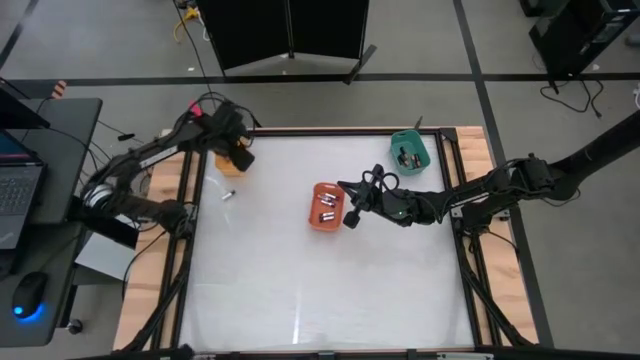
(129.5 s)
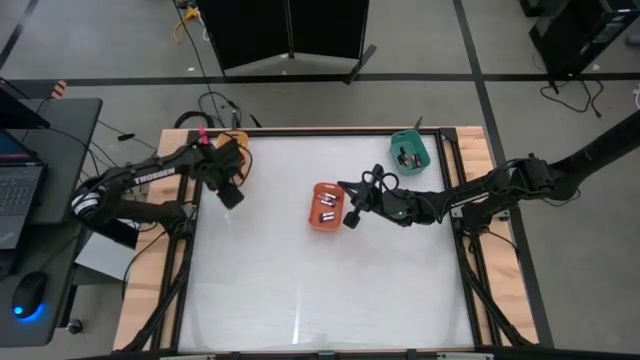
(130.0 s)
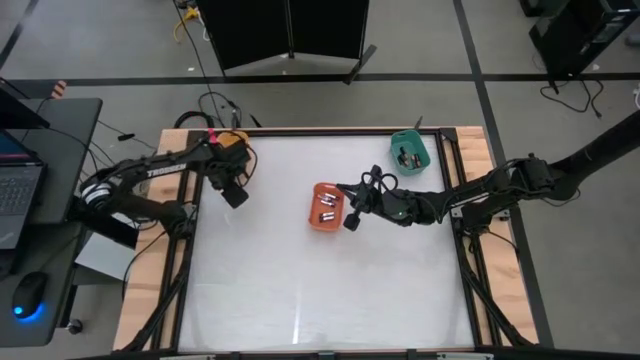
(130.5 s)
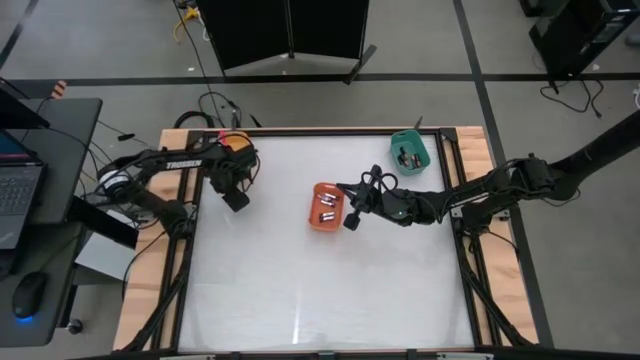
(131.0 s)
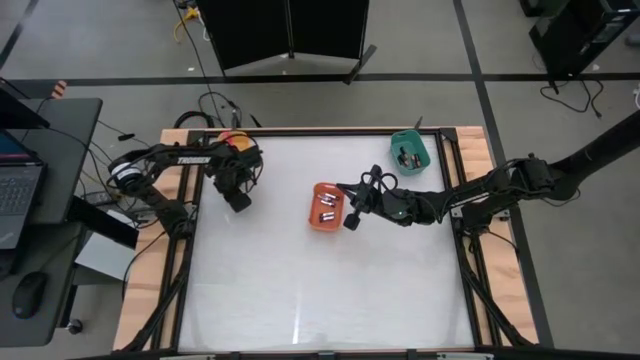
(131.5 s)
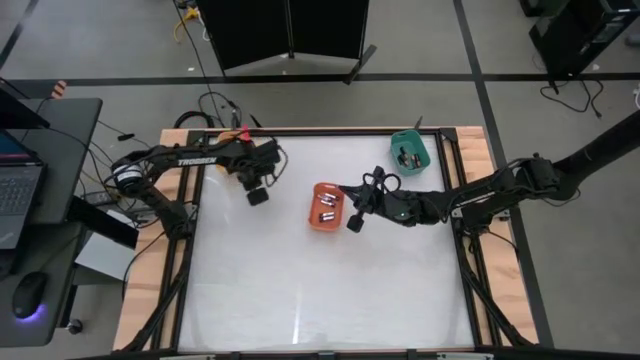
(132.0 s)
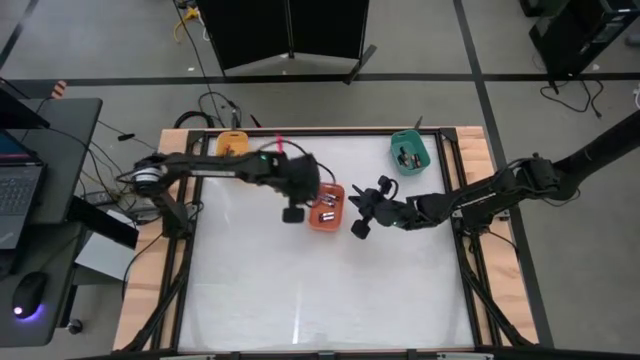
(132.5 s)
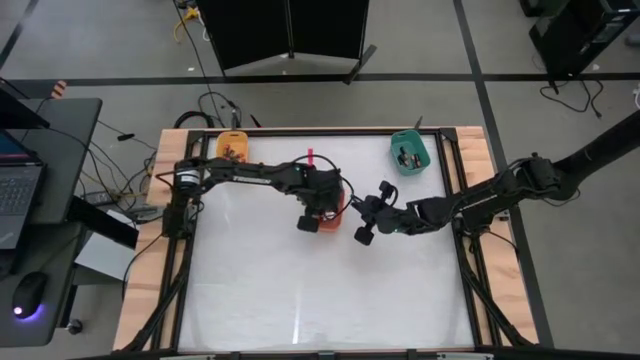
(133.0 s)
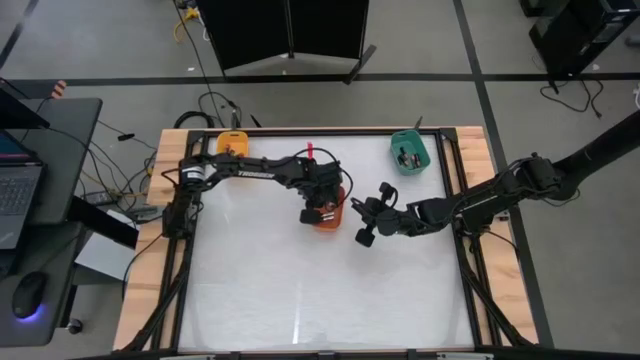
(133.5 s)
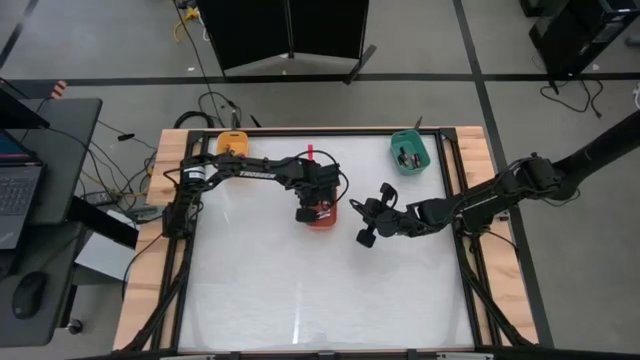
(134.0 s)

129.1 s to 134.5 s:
Task: Sort batteries
Put the silver battery into the orange bin

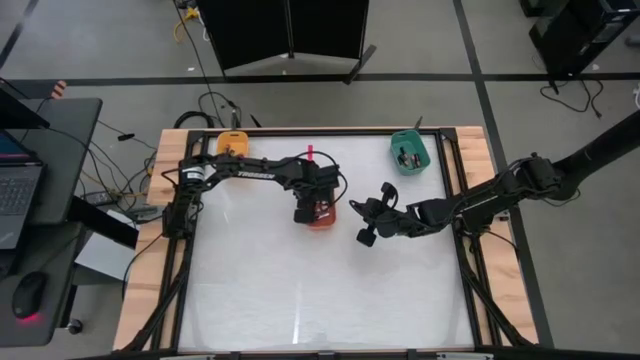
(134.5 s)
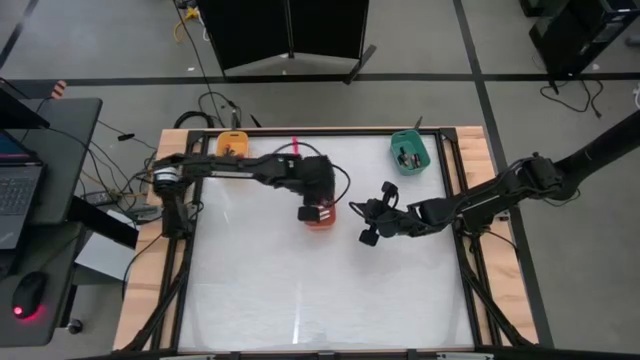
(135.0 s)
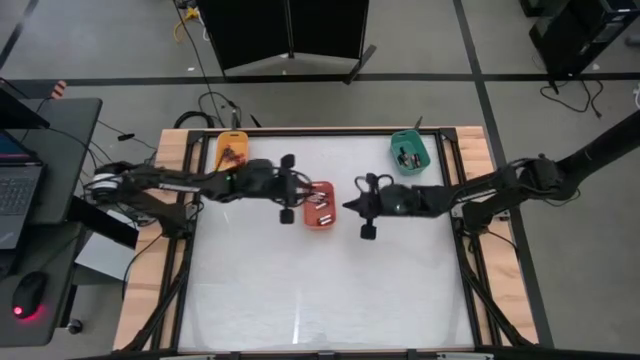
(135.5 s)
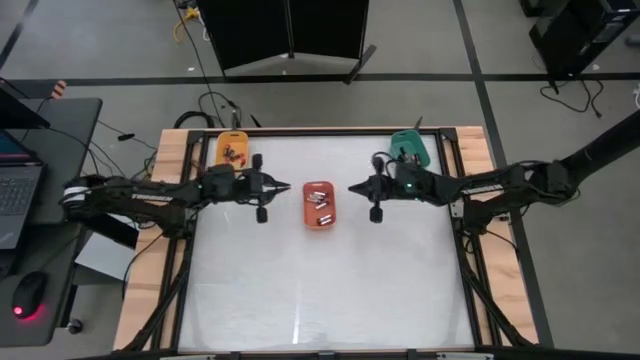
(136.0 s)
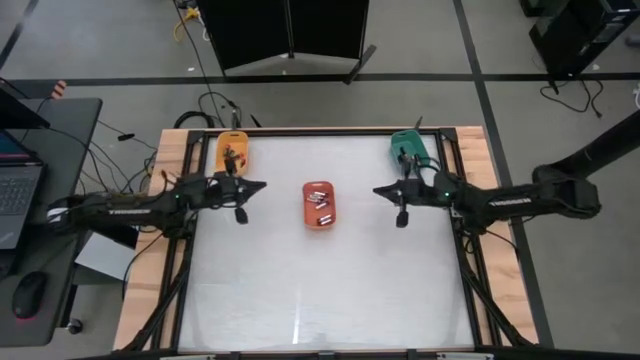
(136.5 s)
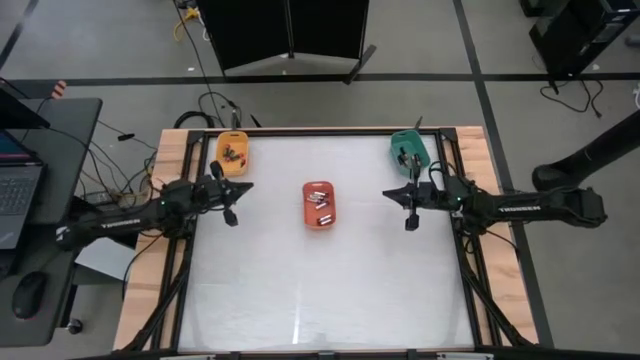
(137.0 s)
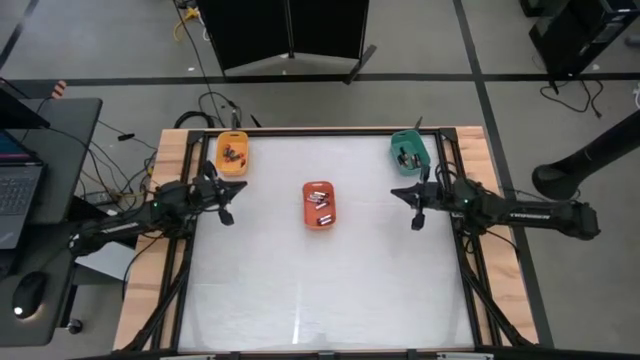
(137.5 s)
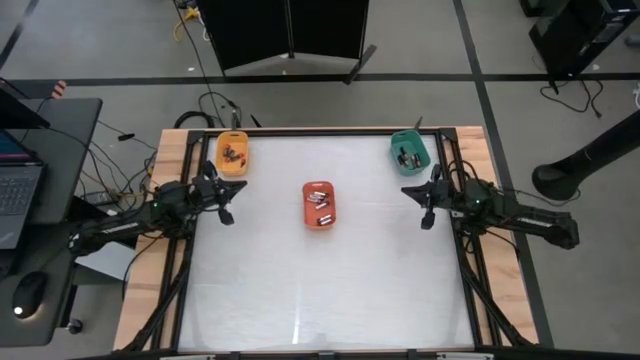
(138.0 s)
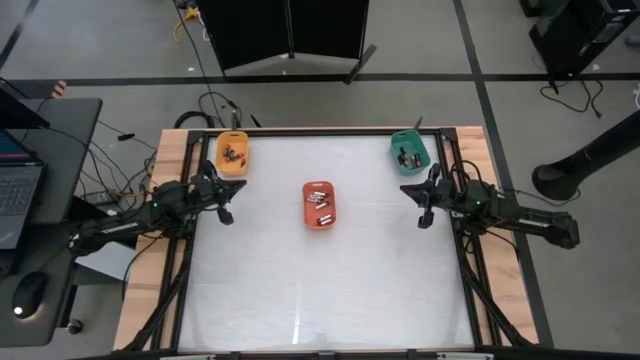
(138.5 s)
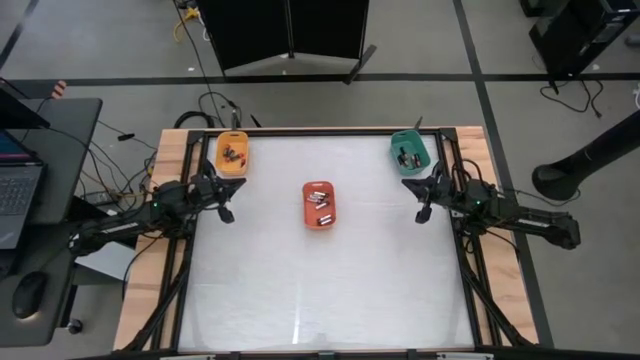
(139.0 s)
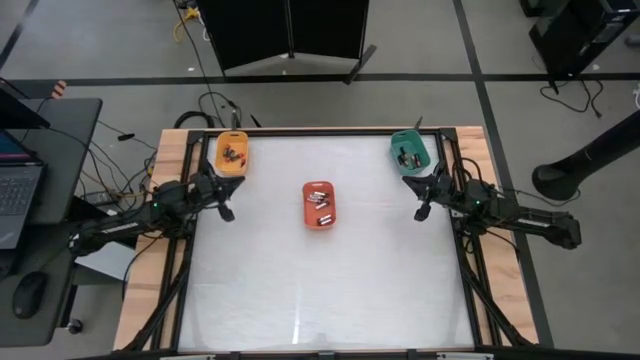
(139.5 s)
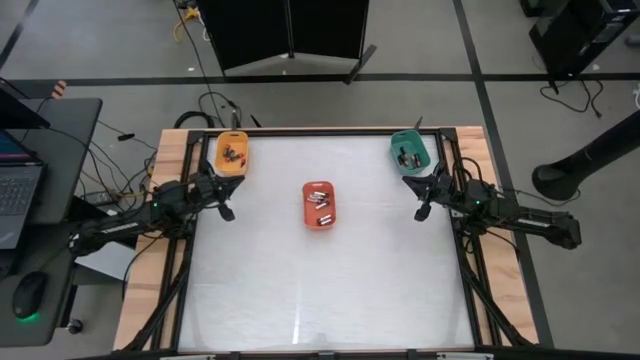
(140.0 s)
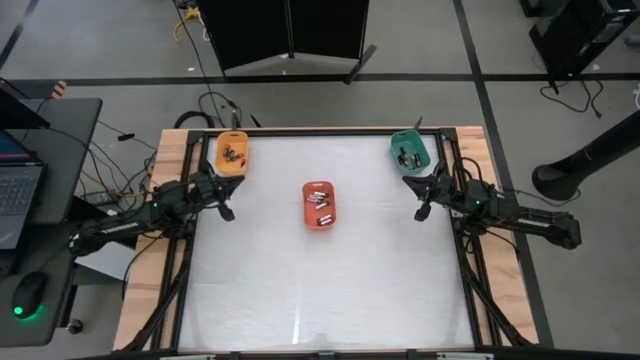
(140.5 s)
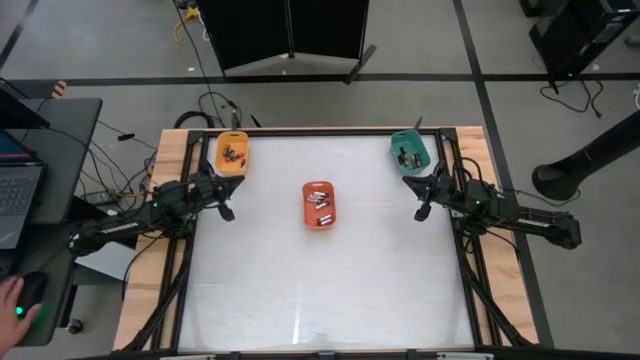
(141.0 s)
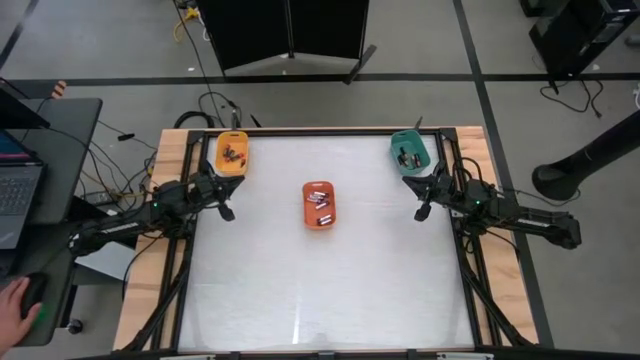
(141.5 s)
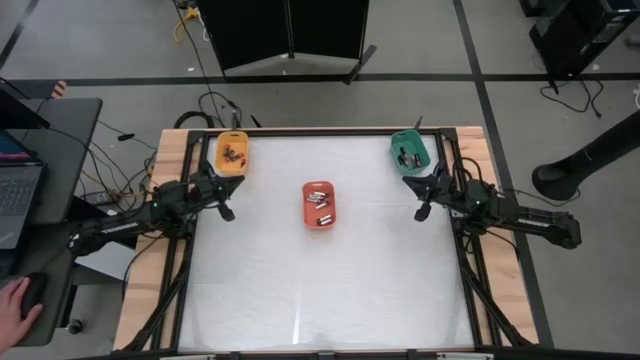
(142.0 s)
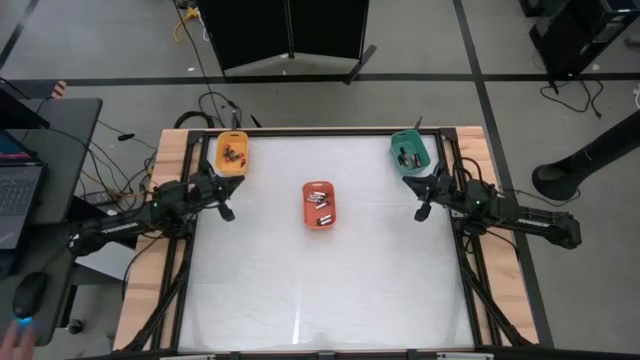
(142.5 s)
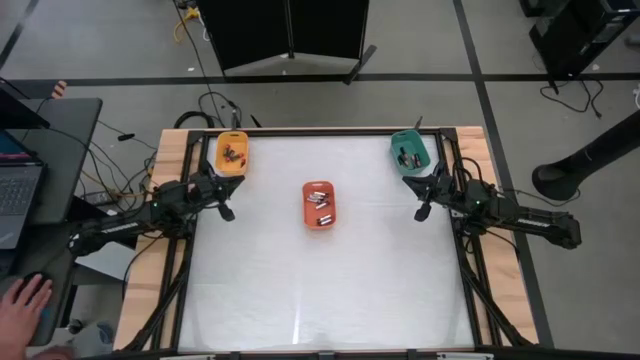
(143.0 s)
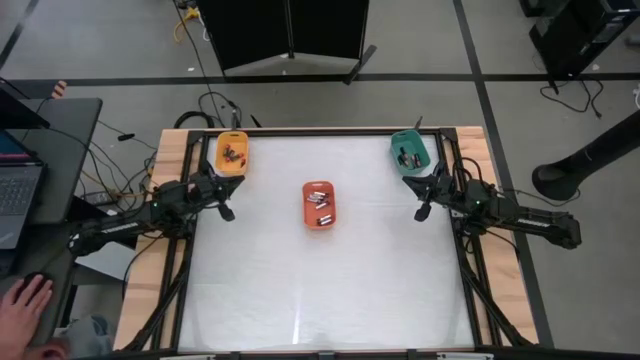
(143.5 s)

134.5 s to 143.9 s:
Return to Home Position

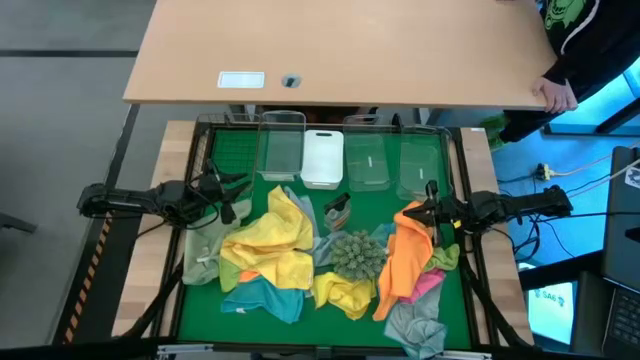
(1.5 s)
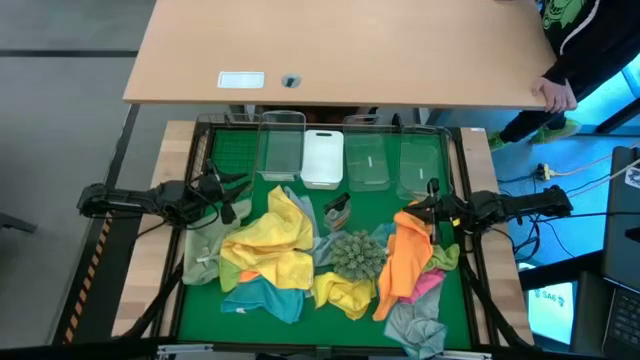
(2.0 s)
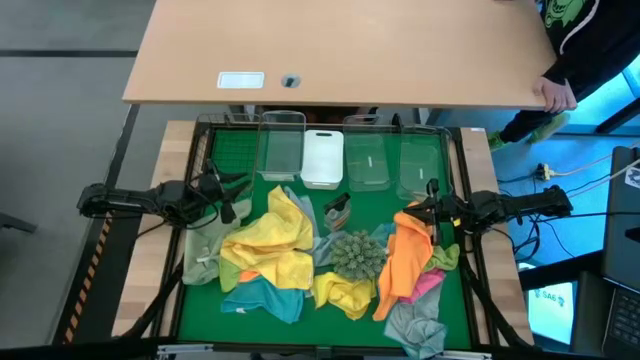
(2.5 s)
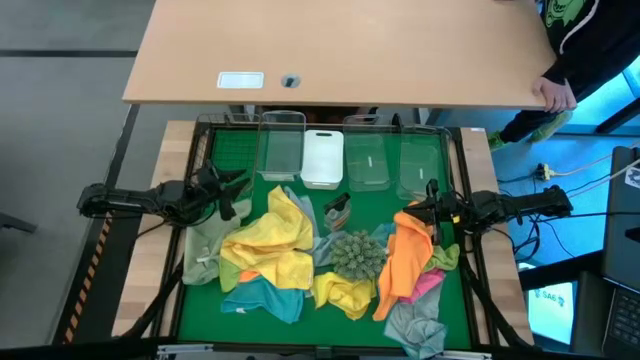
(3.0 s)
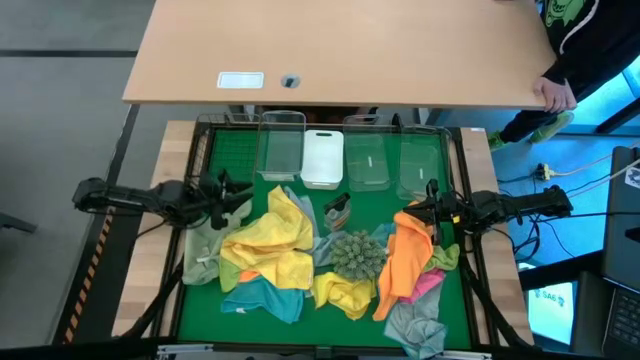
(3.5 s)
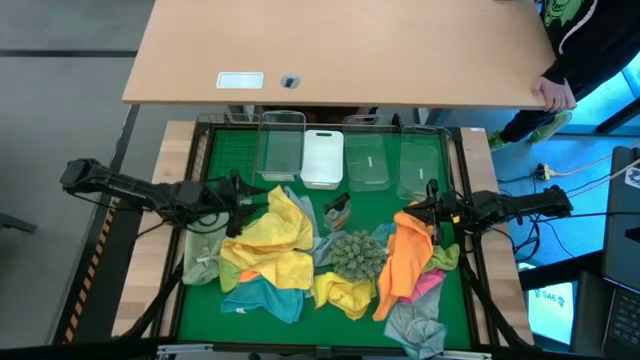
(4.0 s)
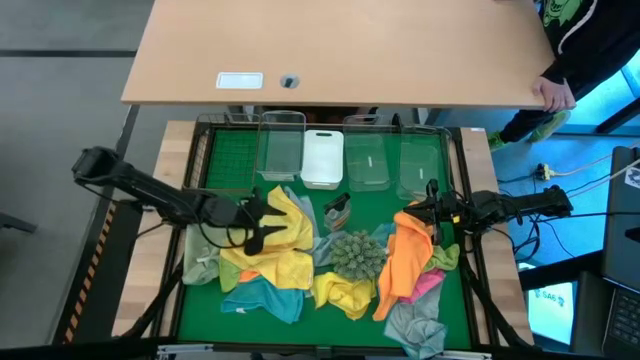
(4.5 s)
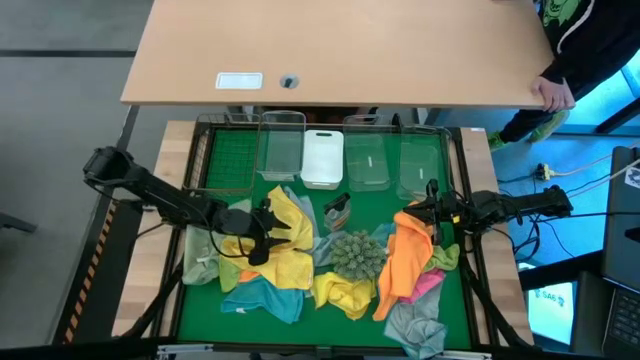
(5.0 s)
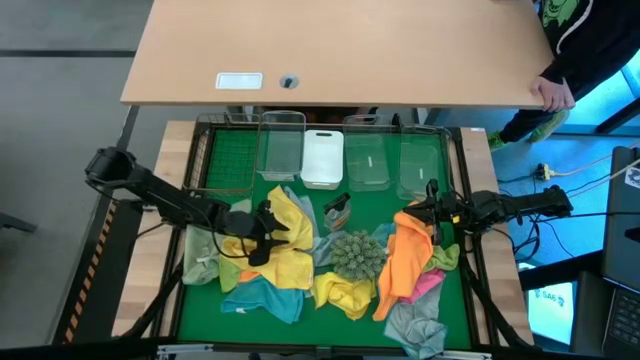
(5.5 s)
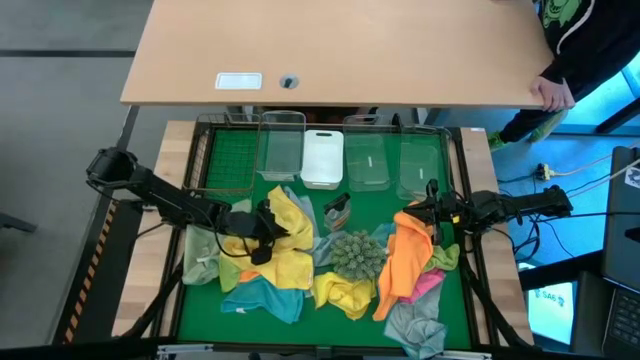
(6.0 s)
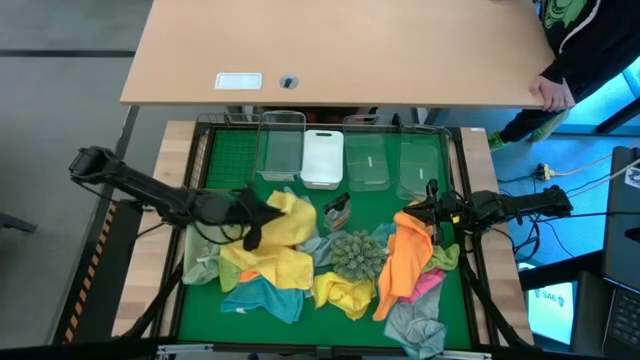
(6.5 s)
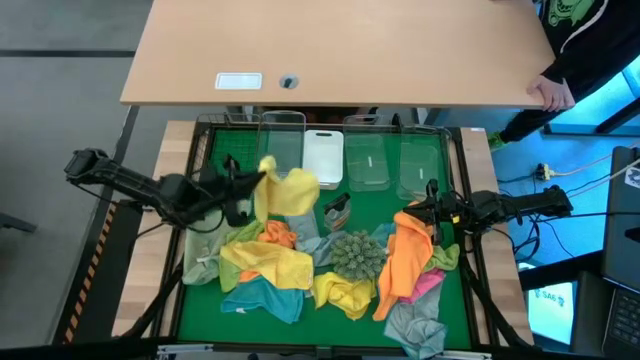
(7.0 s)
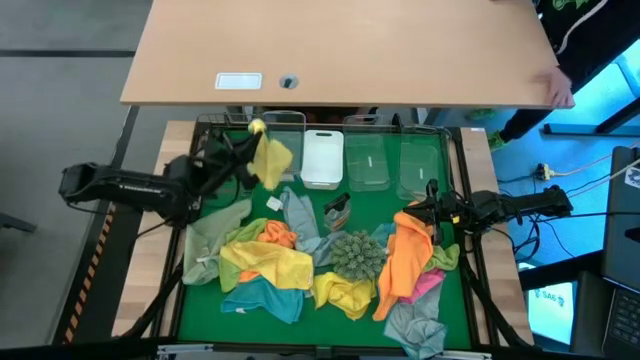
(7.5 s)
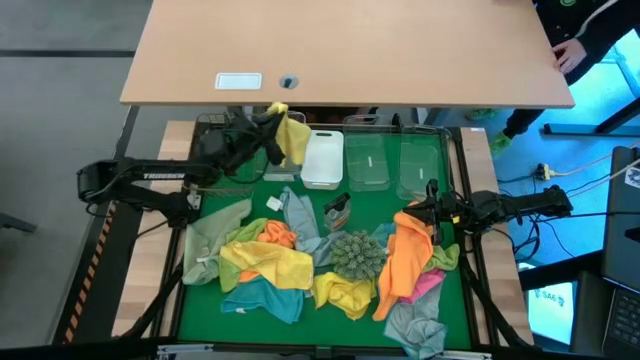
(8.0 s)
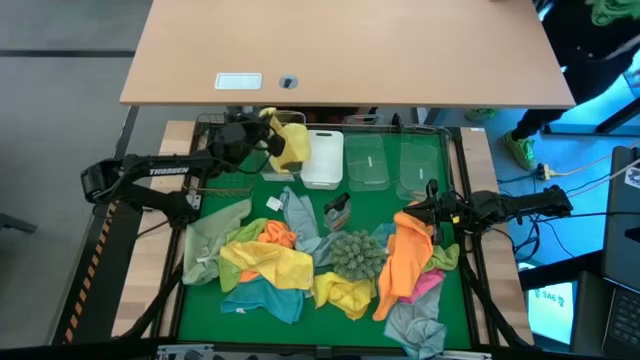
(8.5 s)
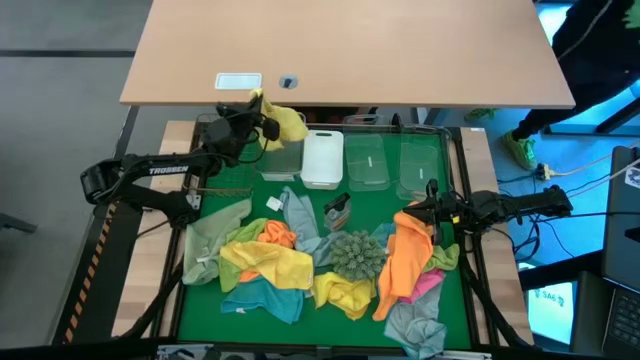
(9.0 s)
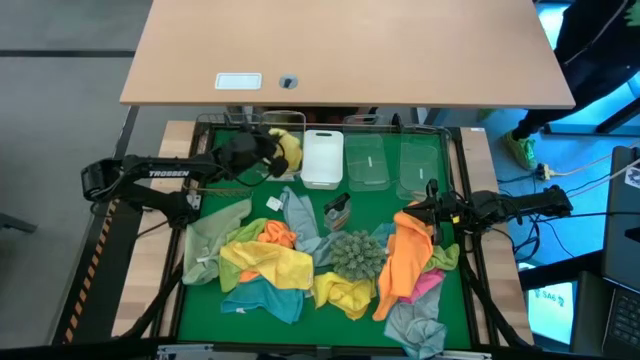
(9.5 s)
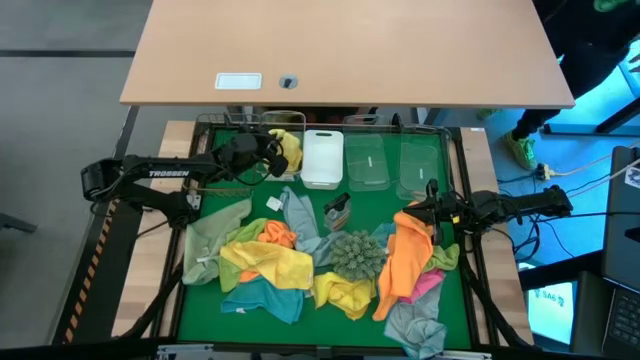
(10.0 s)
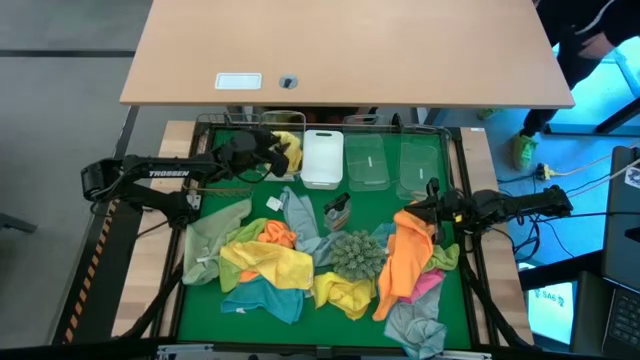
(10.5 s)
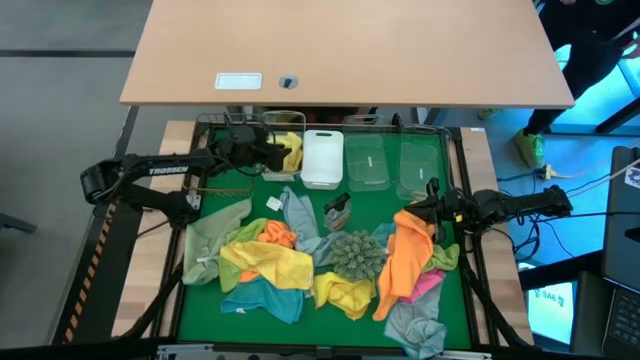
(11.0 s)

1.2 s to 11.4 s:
Task: Sort microfiber towel by color & place in baskets
Put the top left yellow microfiber towel into the left transparent bin
